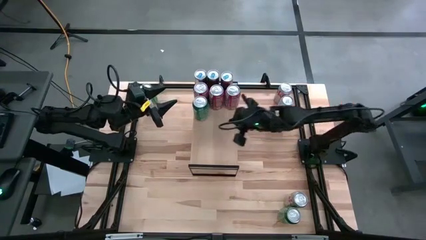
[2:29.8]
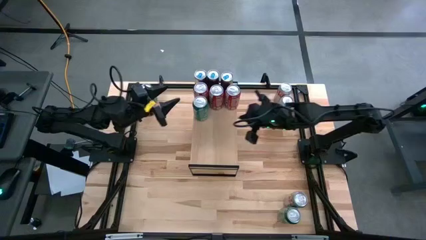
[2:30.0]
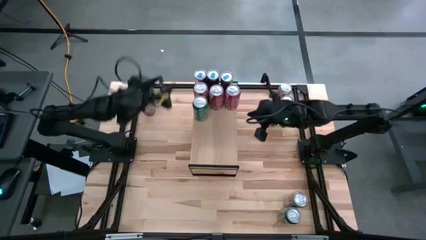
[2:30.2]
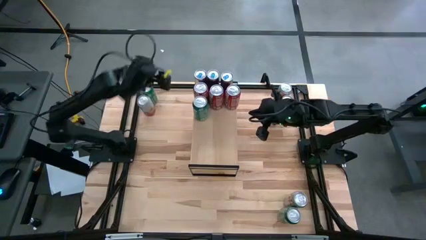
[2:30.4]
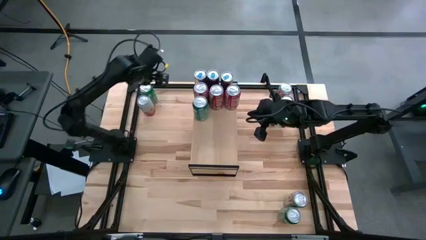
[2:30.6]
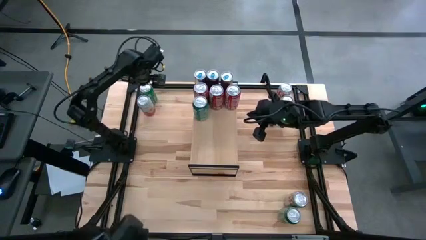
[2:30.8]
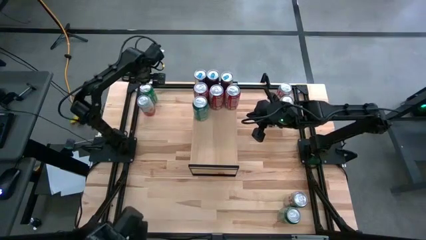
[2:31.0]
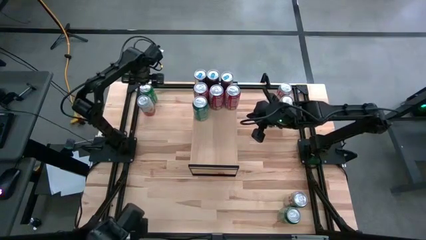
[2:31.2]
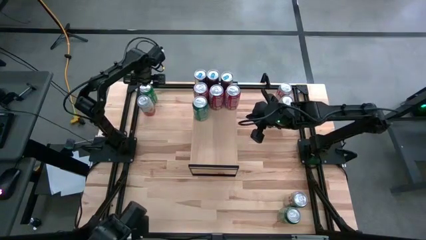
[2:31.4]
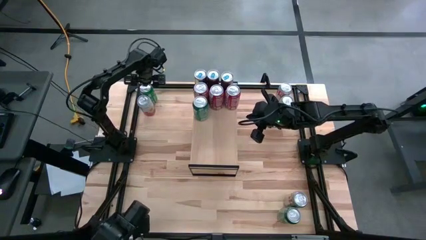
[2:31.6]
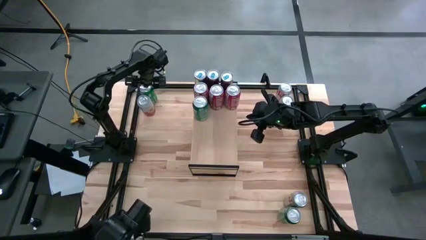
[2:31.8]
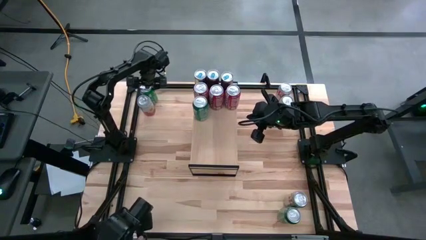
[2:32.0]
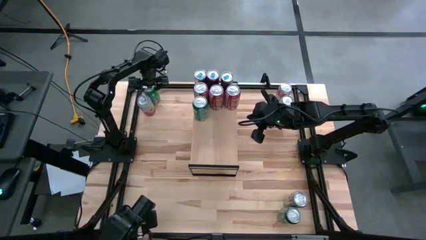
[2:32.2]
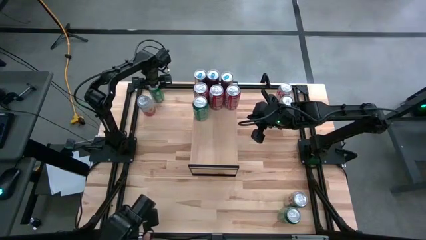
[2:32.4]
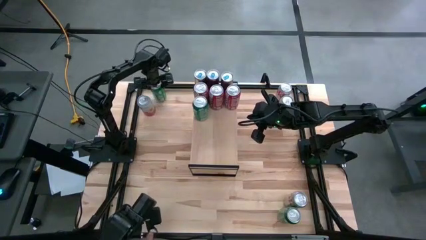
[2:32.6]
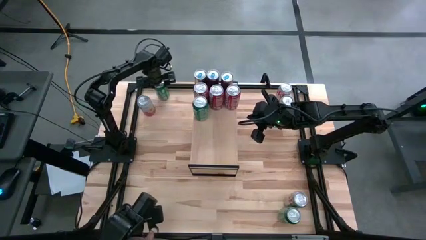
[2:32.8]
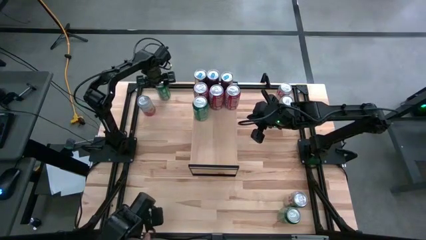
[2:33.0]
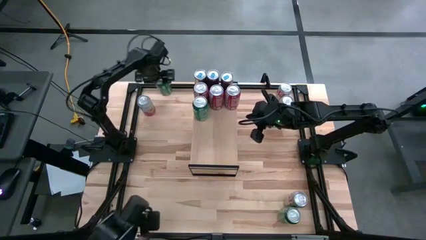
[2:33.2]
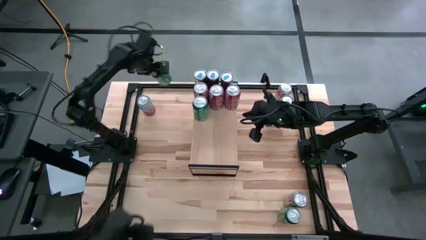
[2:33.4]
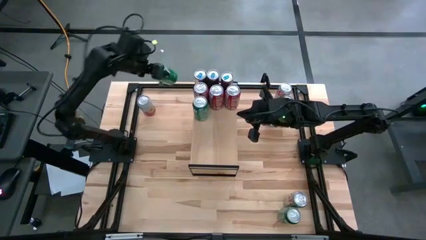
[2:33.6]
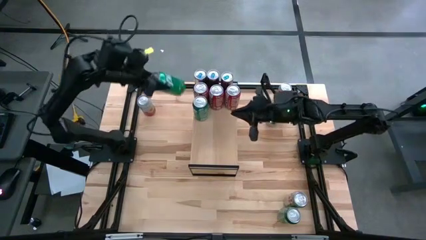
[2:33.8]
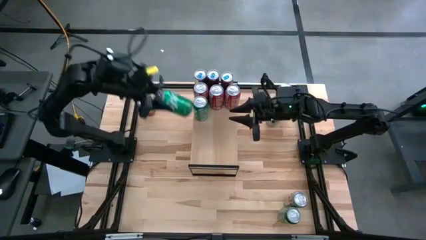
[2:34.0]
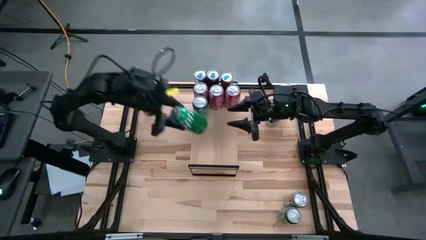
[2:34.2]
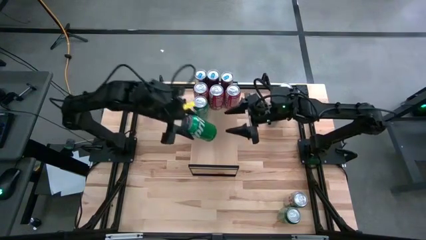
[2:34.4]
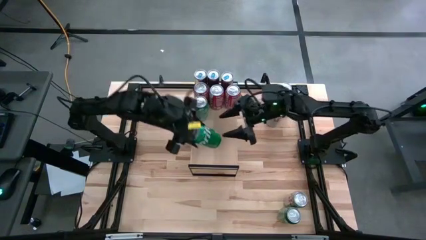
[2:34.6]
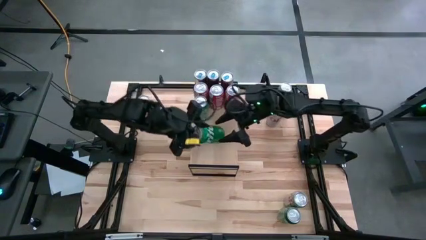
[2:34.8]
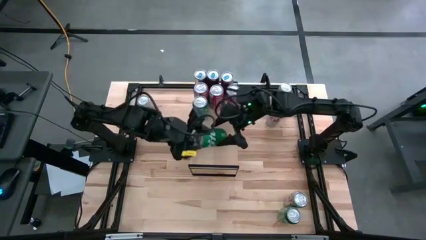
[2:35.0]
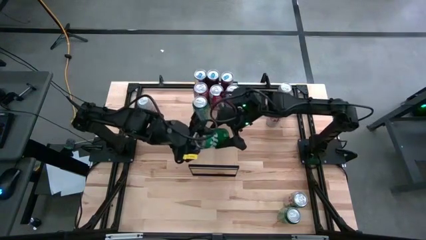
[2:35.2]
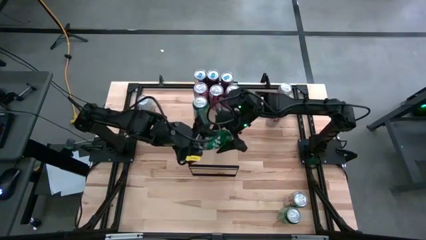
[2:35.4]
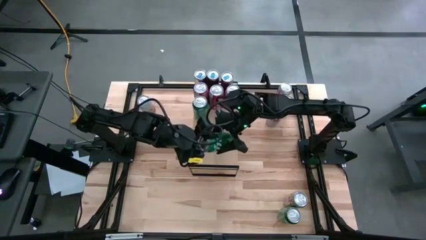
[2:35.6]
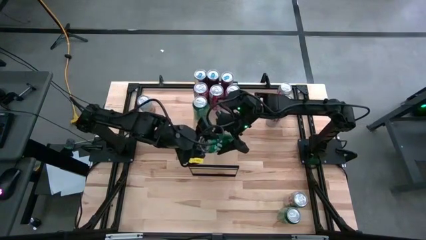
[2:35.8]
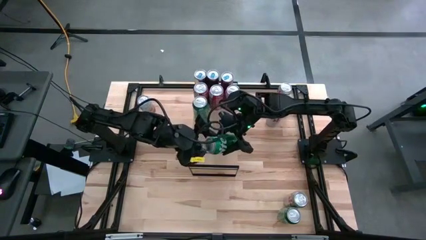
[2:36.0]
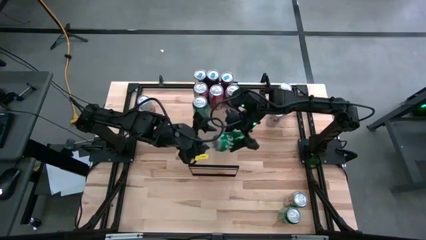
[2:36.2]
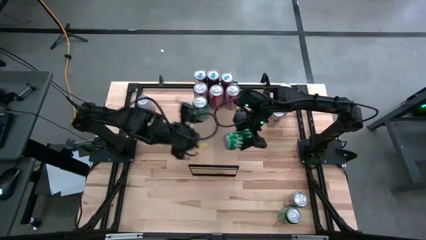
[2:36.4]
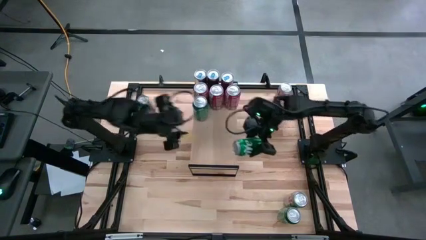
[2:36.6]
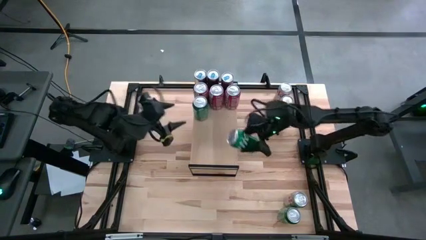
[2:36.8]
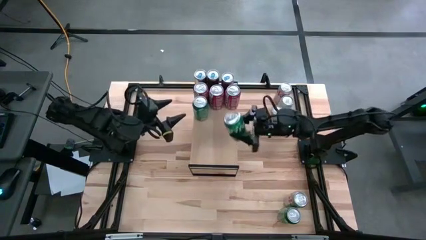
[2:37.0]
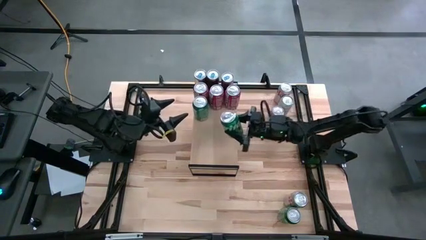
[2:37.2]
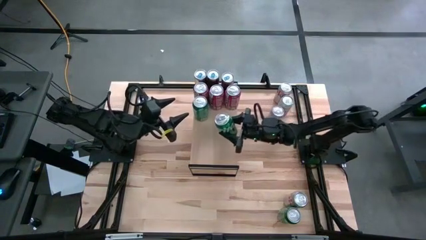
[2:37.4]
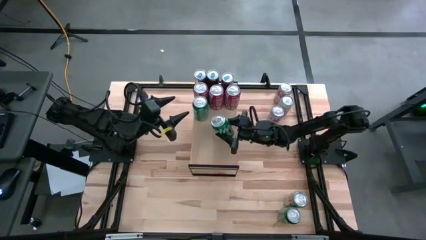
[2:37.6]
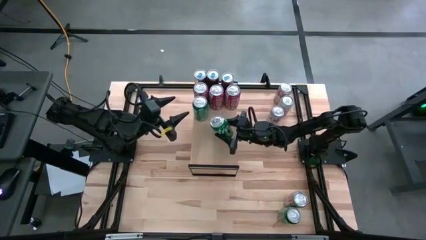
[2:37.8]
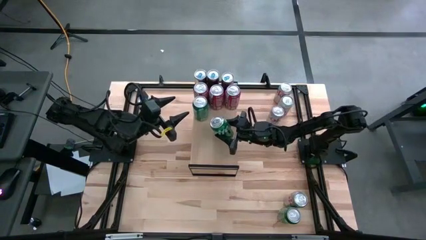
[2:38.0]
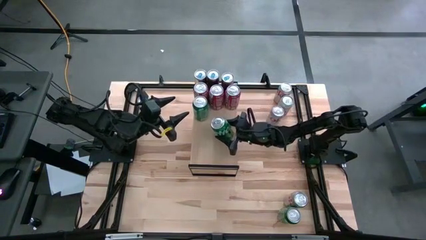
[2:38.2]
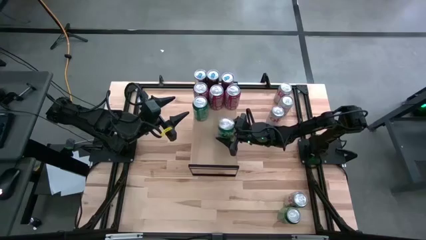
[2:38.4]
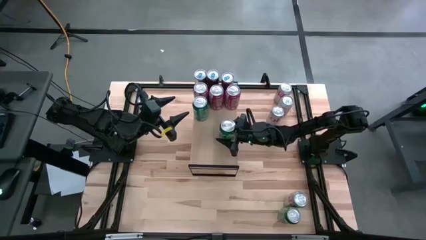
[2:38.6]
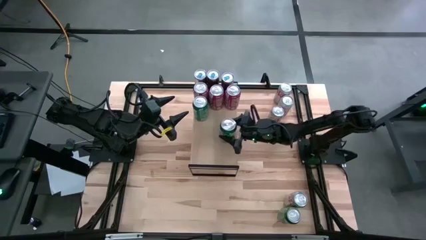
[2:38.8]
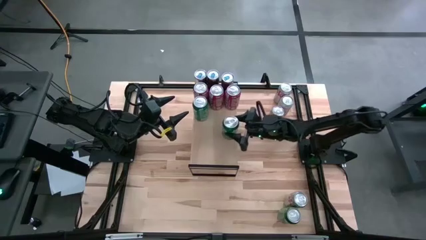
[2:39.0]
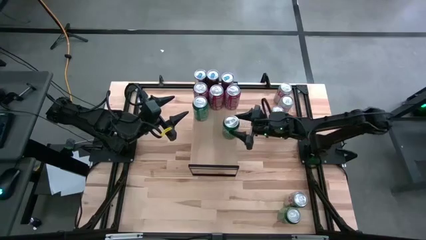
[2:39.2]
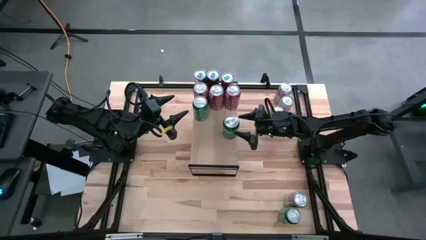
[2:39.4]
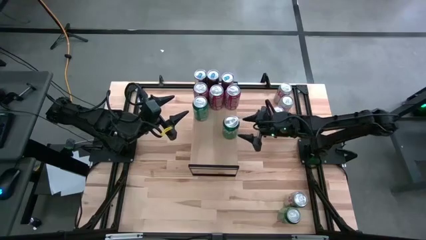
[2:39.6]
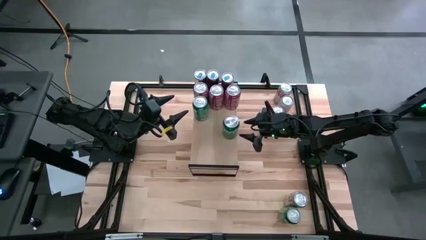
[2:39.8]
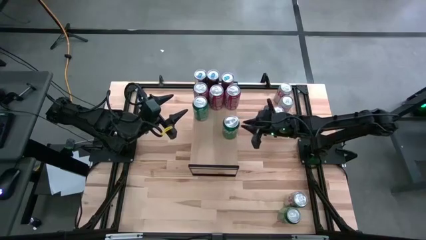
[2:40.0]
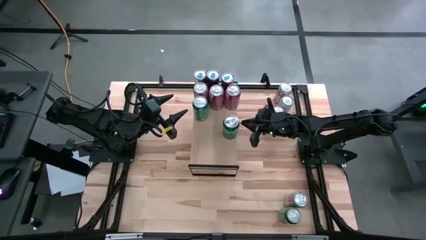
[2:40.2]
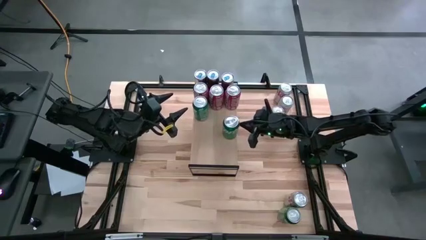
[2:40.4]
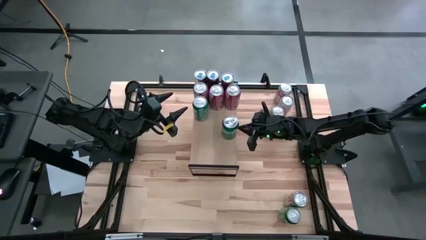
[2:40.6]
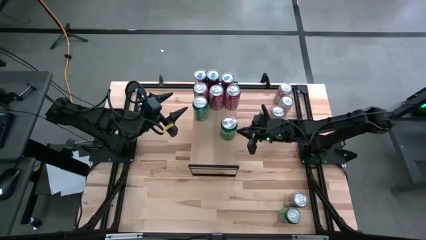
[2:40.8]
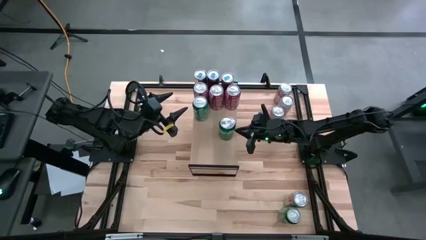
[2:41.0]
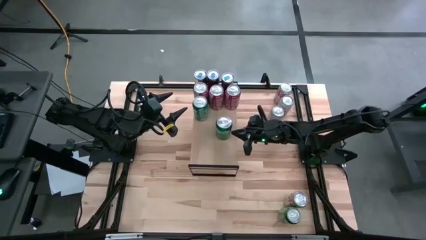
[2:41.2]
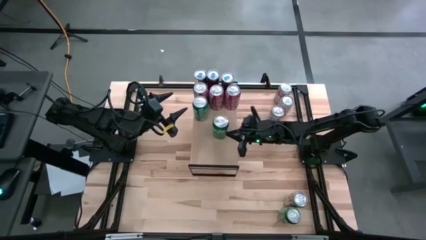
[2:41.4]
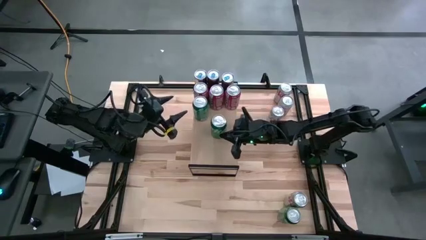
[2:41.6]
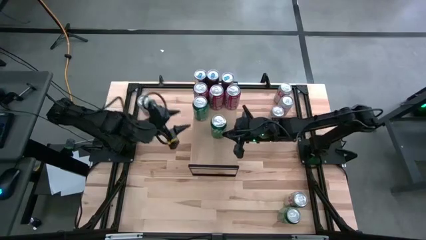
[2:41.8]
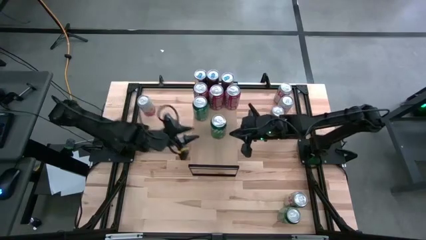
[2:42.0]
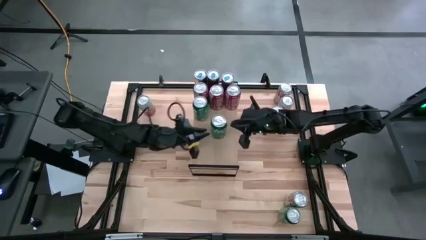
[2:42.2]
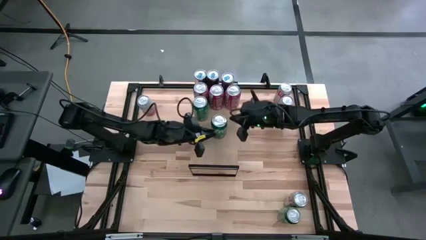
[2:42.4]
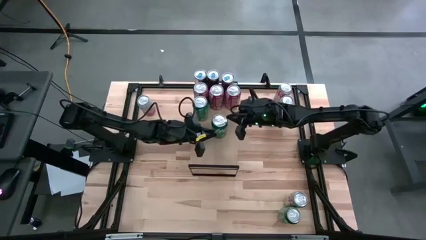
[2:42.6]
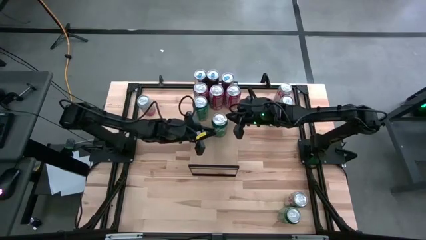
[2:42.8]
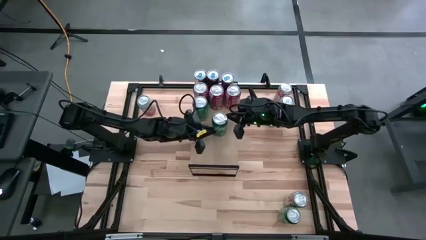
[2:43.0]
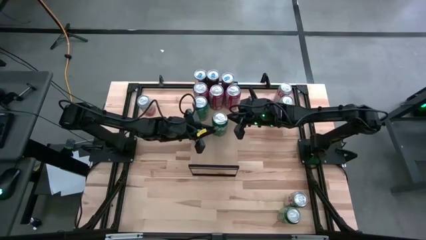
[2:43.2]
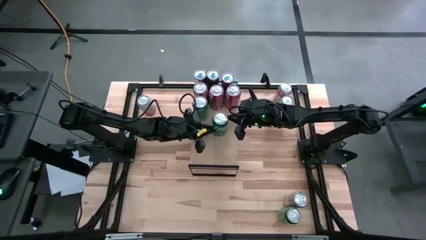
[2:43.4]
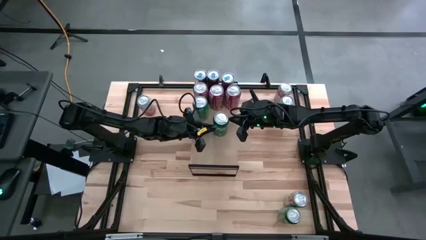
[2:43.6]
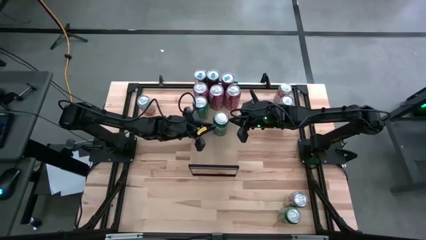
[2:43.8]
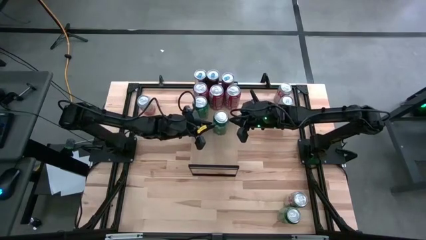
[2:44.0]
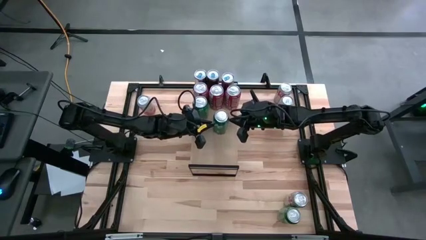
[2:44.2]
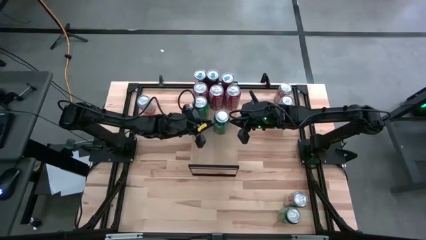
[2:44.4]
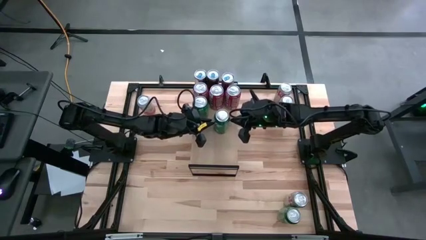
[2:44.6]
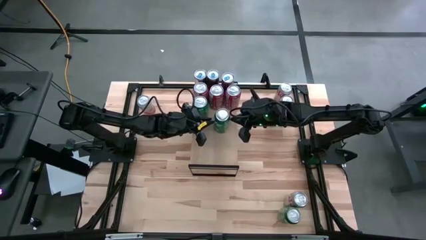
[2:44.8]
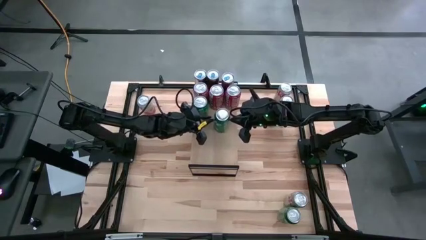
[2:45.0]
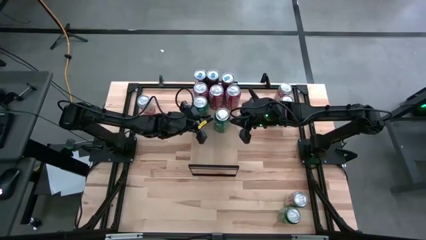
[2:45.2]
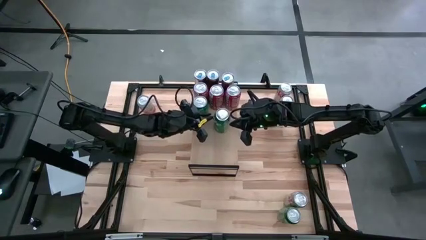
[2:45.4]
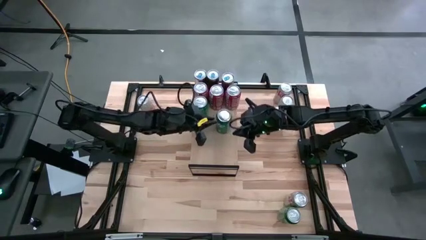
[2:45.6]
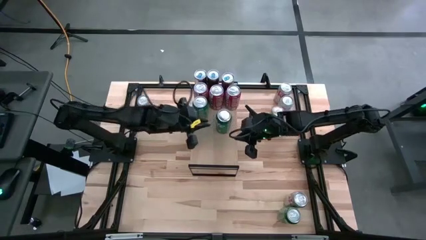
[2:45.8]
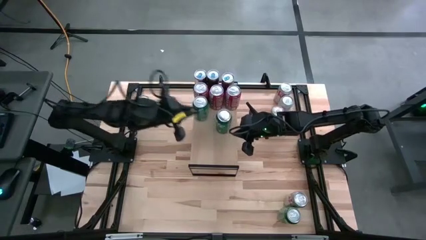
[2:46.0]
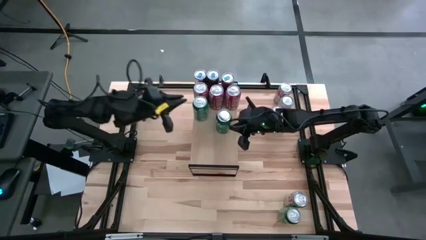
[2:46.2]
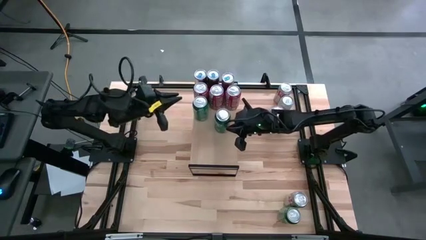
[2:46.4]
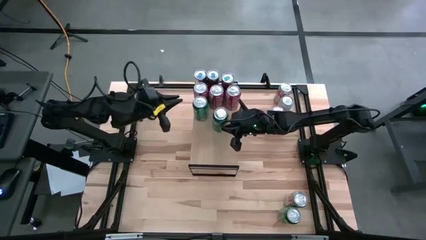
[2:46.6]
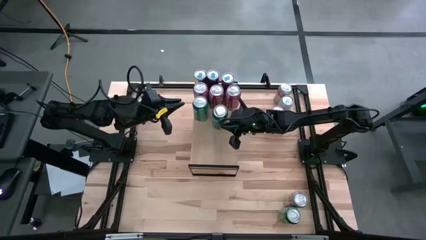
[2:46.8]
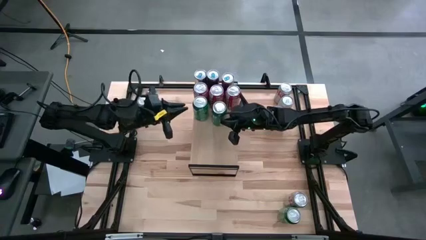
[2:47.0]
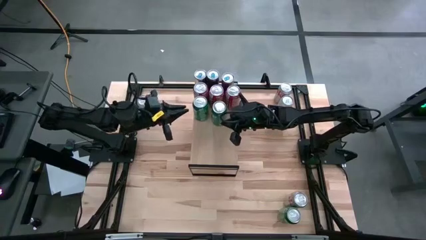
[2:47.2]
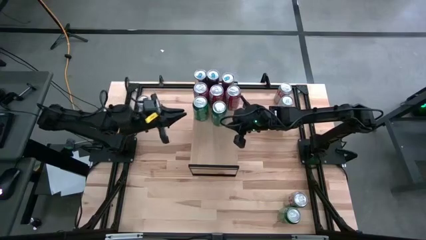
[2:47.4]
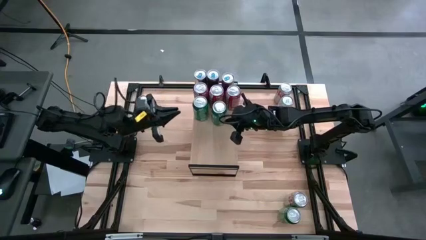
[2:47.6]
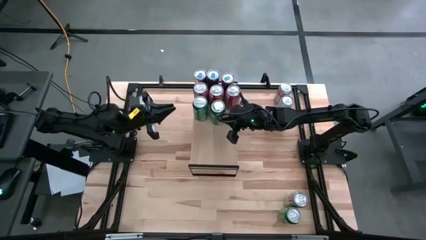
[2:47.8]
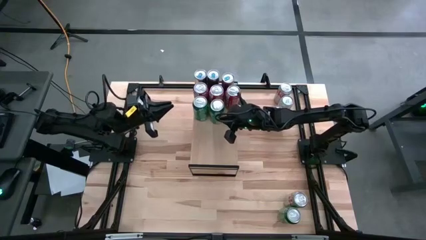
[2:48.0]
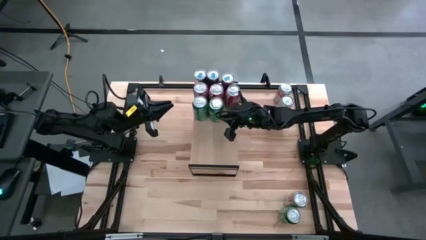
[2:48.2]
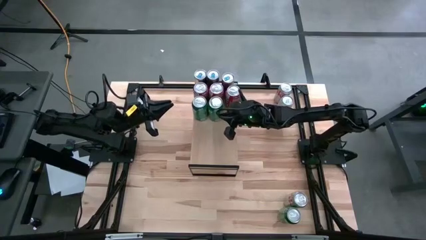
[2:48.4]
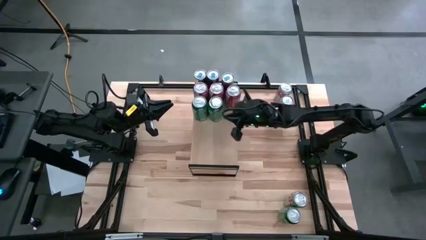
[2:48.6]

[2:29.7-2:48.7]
Task: Place canned beverage on shelf
Put the top green soda can on the shelf
